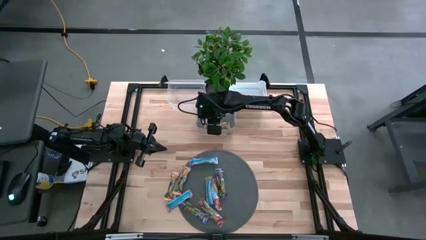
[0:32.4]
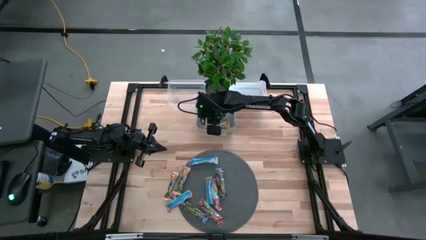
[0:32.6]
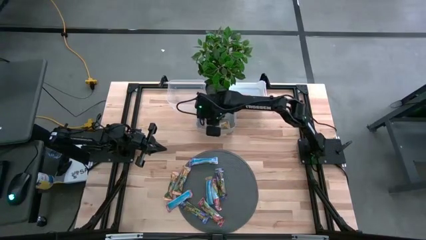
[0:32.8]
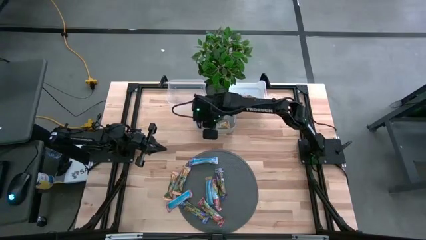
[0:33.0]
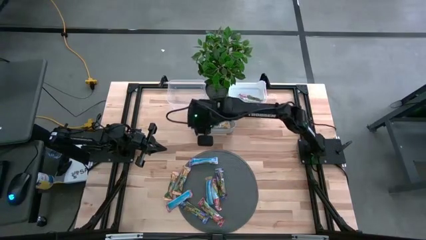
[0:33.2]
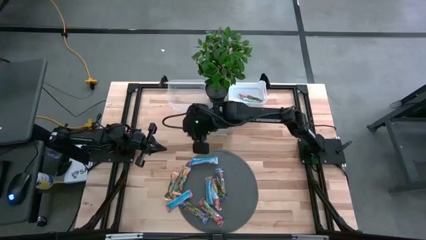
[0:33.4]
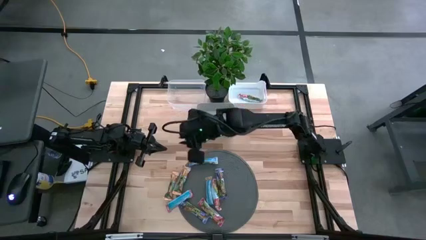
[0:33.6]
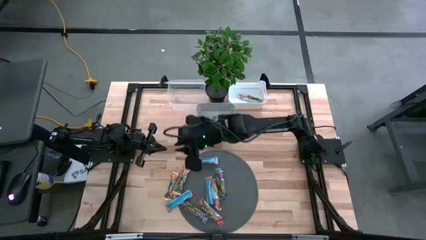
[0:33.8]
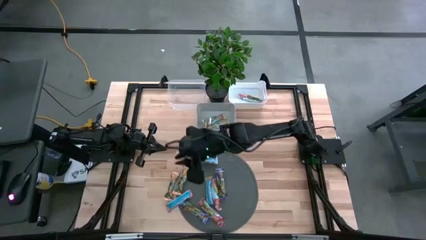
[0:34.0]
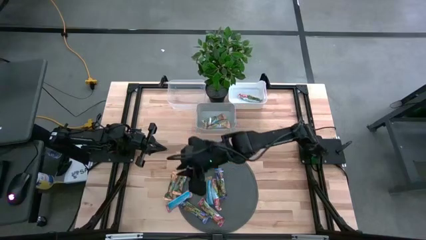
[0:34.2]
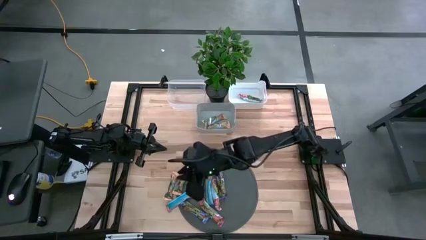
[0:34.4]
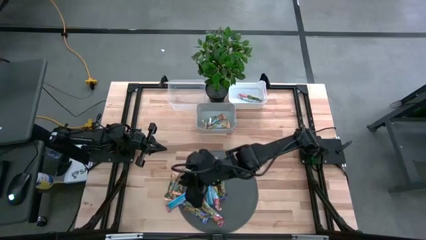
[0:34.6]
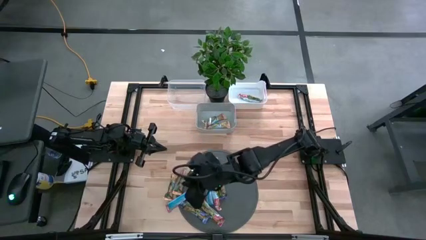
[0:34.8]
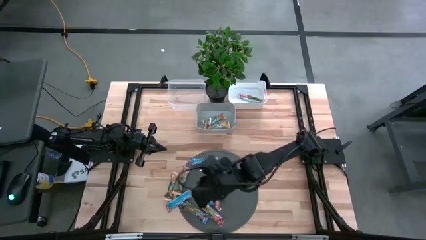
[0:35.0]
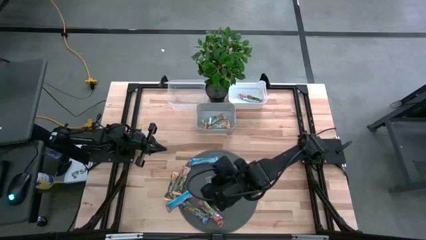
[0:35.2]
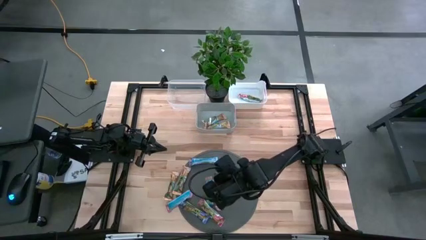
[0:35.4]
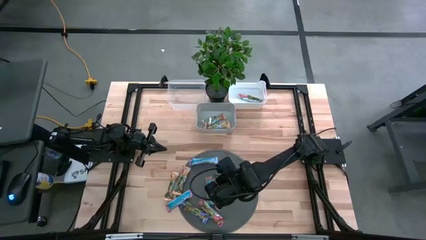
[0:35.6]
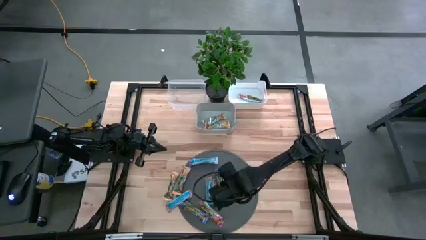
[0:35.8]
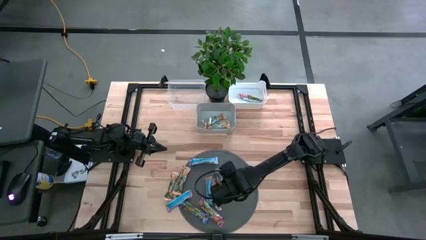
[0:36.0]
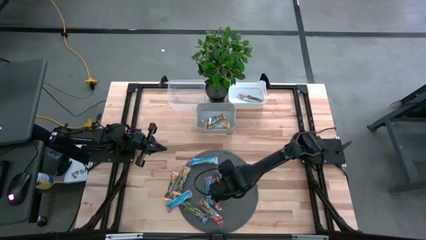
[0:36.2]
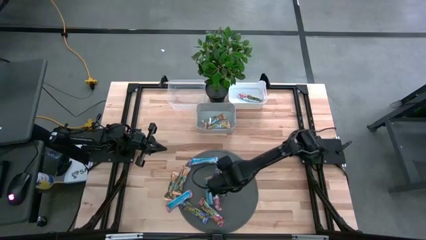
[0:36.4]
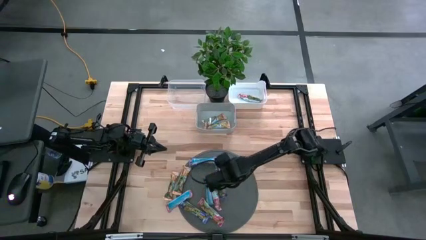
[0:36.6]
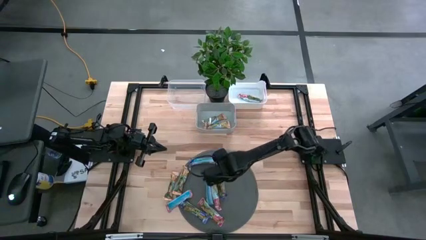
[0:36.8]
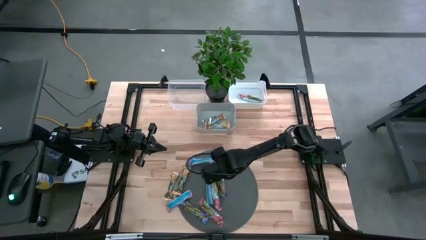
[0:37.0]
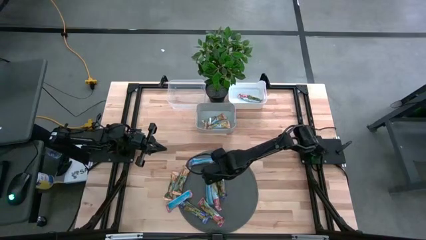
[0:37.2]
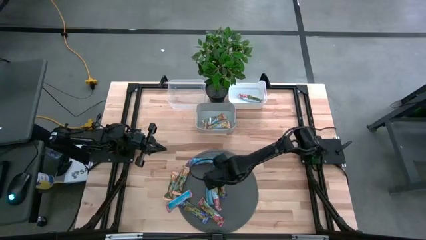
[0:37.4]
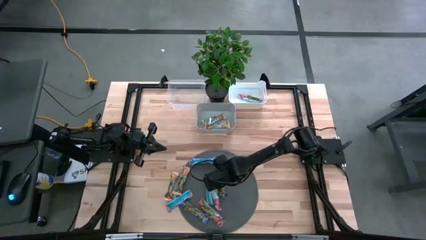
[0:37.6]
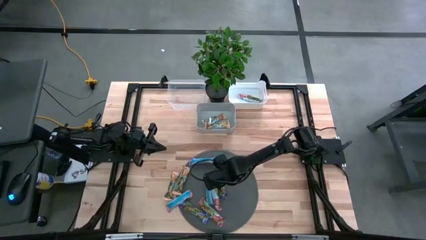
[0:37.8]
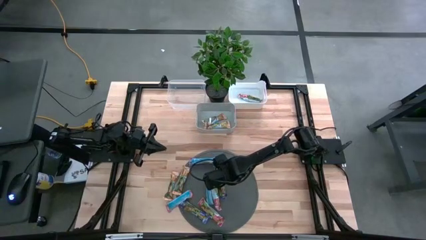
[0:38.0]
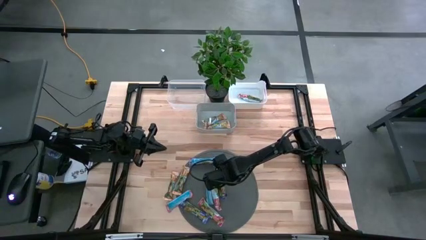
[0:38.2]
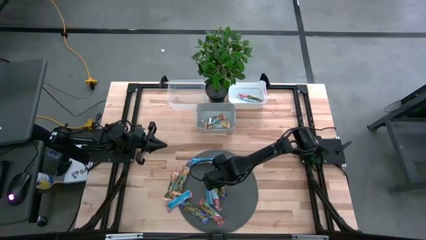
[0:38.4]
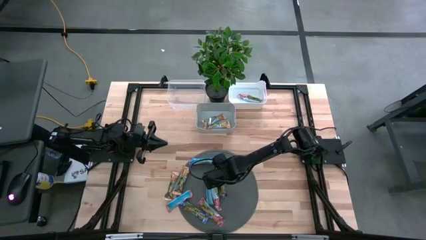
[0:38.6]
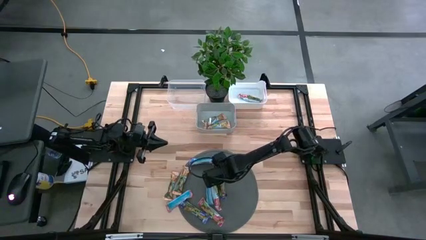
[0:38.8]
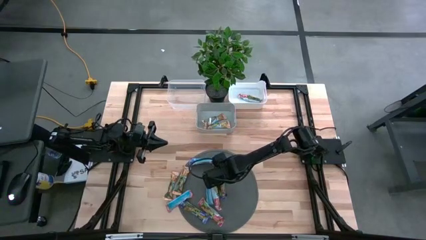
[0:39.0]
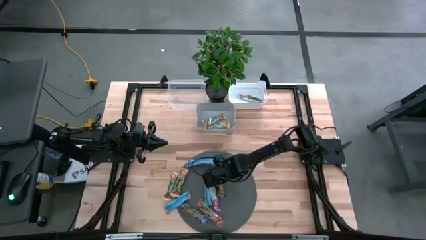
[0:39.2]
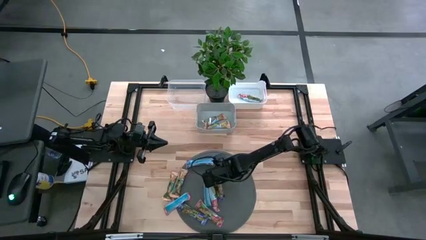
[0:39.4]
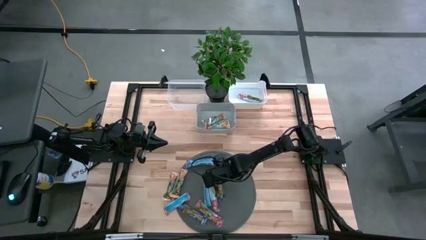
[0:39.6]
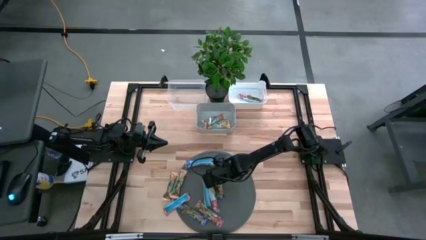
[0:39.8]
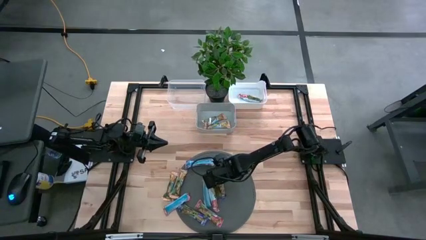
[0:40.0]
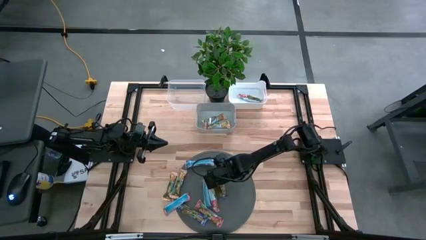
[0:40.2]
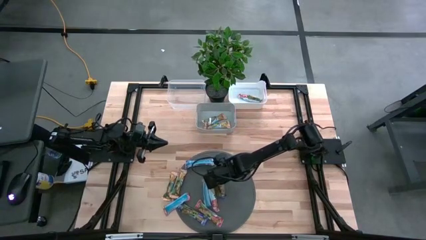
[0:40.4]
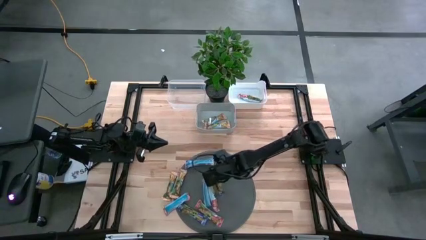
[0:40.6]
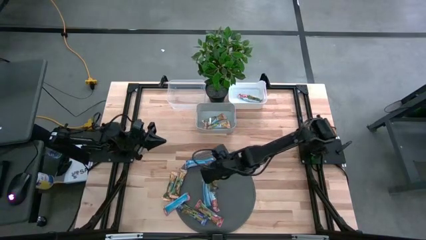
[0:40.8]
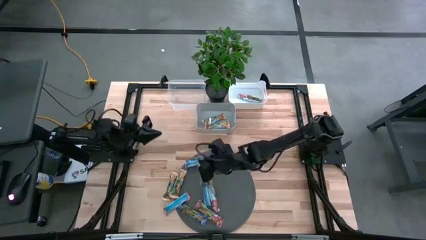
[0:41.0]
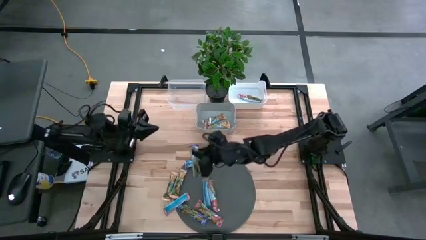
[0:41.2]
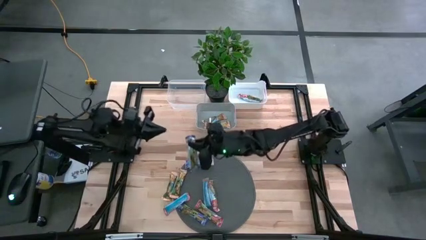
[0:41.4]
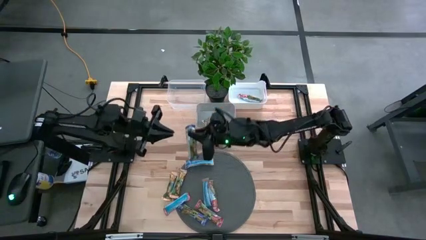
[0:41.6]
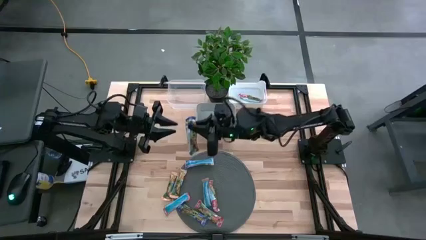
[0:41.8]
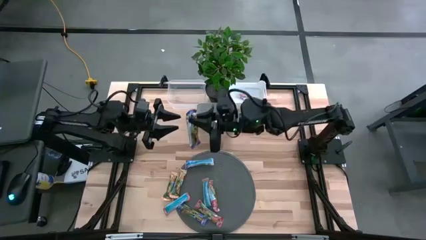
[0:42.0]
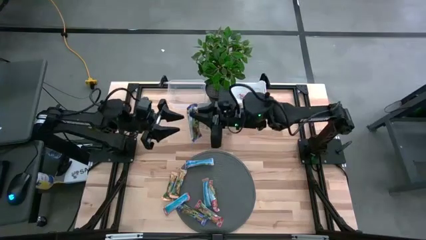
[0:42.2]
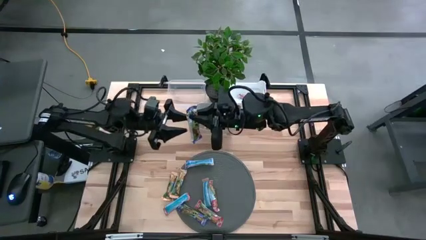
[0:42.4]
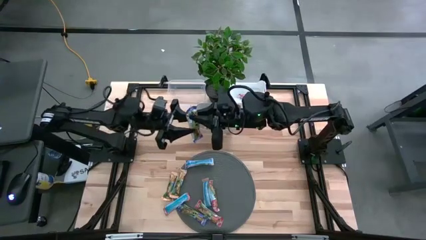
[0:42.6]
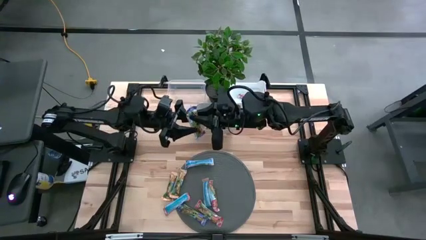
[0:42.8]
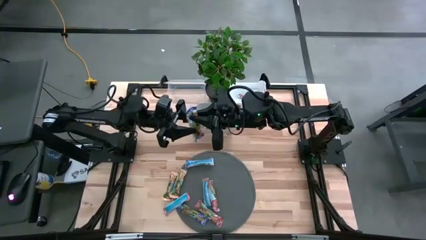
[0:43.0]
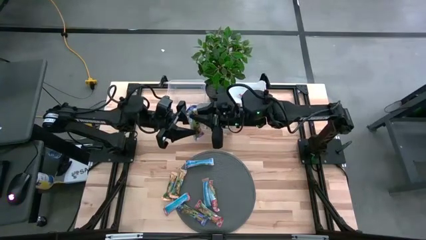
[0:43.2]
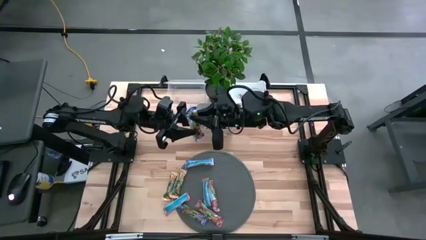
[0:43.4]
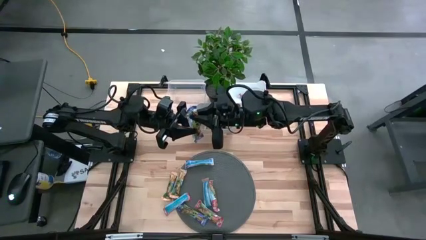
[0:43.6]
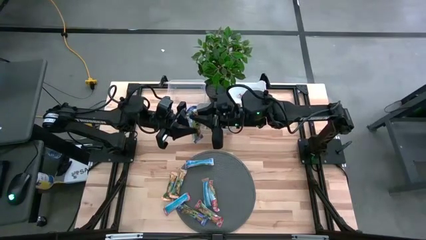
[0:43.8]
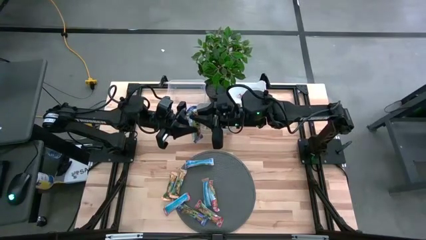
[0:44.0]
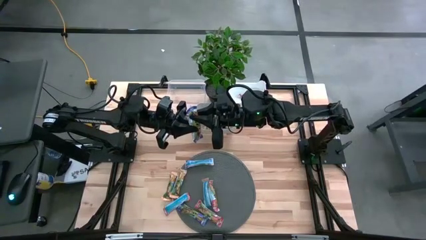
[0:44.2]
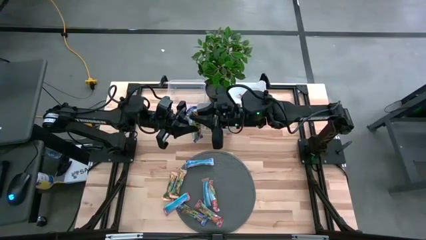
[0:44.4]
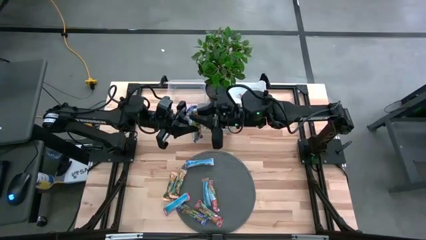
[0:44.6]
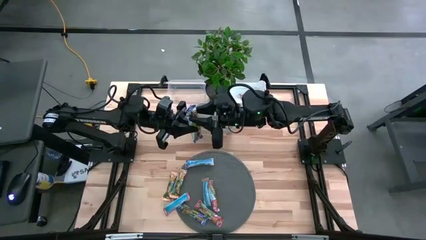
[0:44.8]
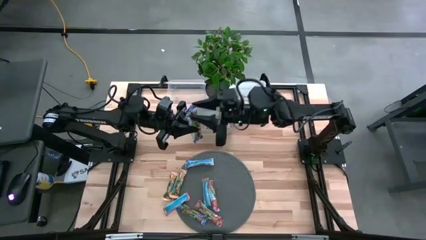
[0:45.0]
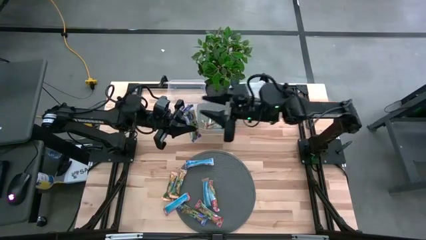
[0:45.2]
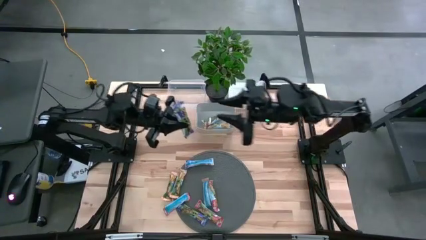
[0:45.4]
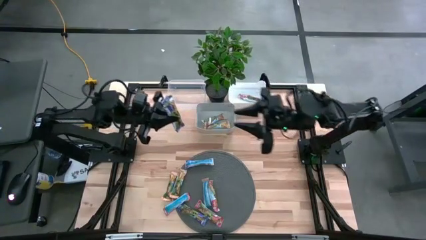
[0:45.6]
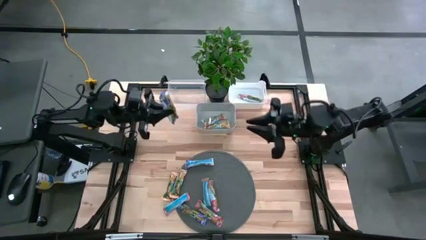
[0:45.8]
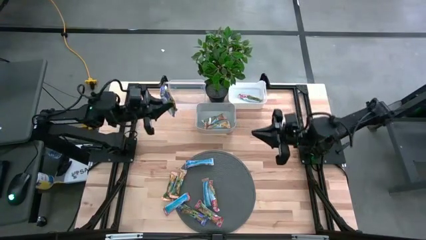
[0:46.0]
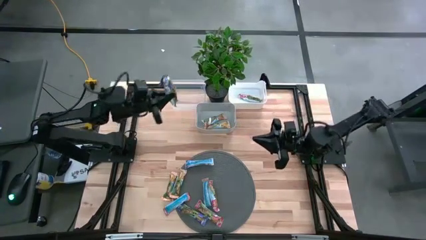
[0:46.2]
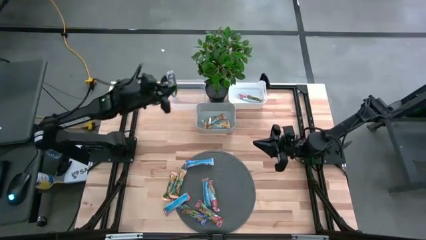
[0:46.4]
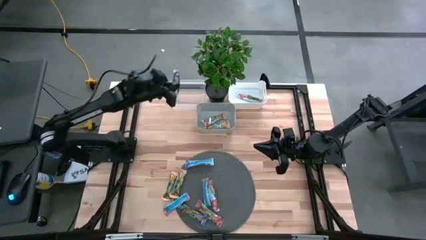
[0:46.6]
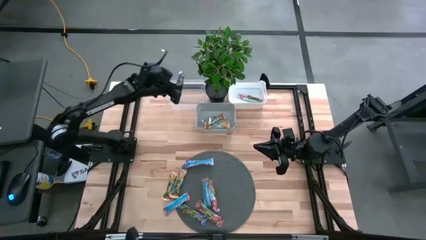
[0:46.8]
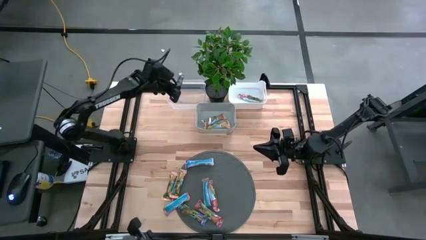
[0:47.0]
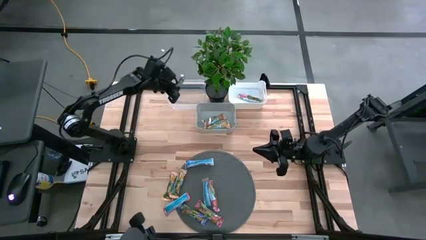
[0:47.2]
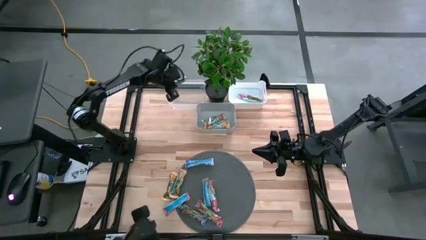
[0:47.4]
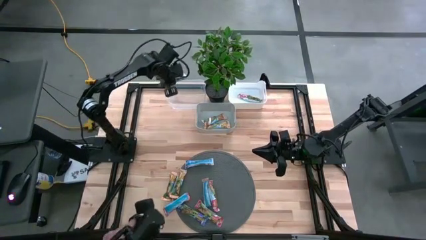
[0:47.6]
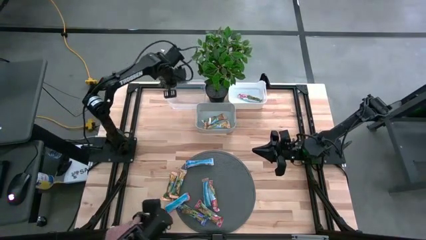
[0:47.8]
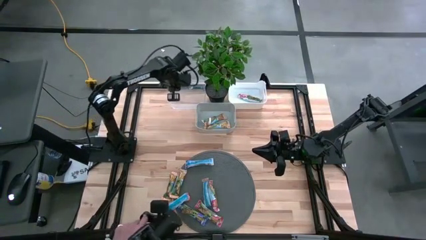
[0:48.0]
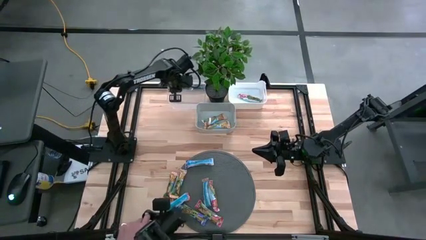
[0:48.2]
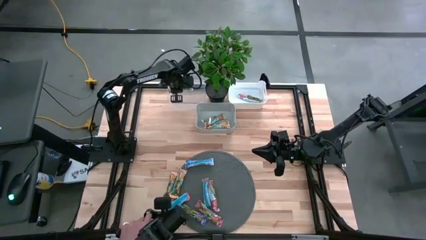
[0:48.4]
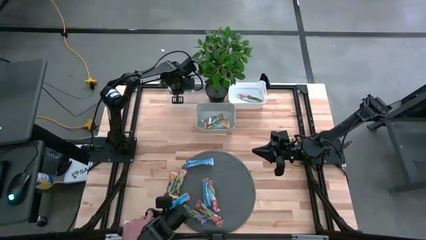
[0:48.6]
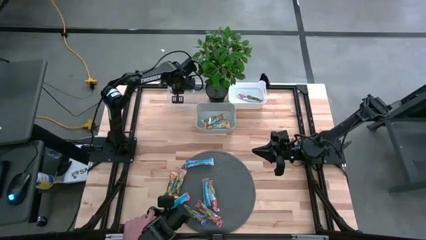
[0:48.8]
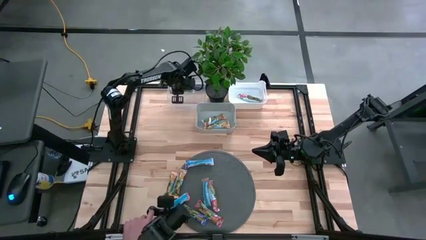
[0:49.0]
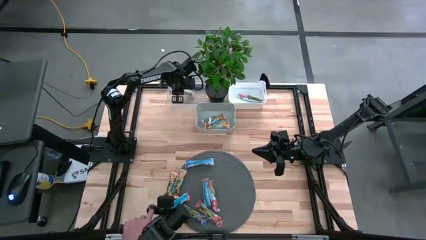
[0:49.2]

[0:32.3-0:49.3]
Task: Pick and place Granola Bars by type
Put the blue granola bar into the transparent bin
